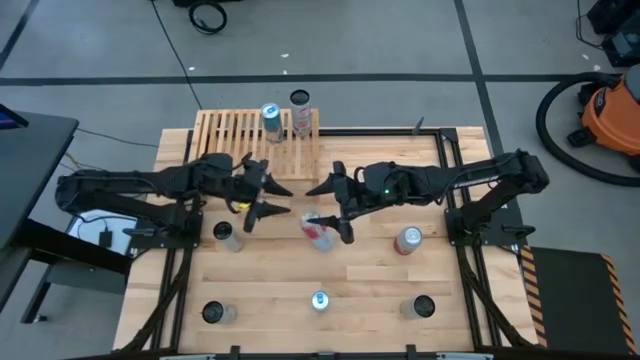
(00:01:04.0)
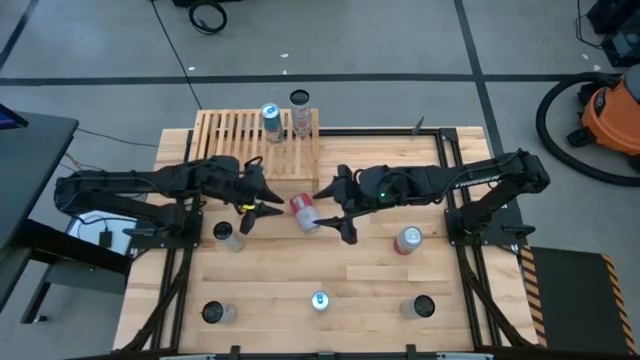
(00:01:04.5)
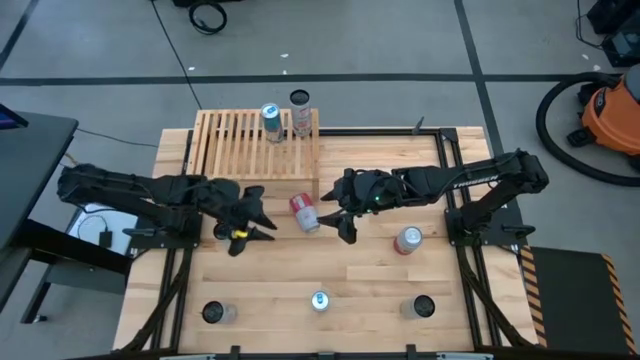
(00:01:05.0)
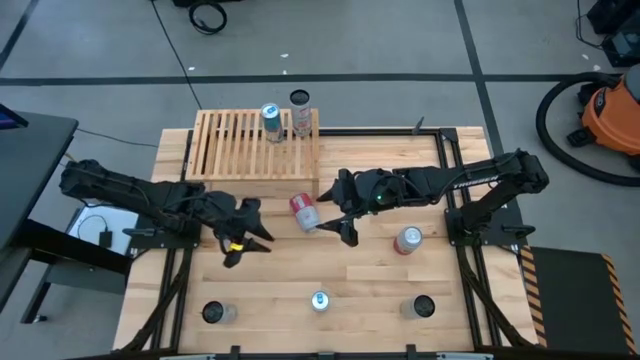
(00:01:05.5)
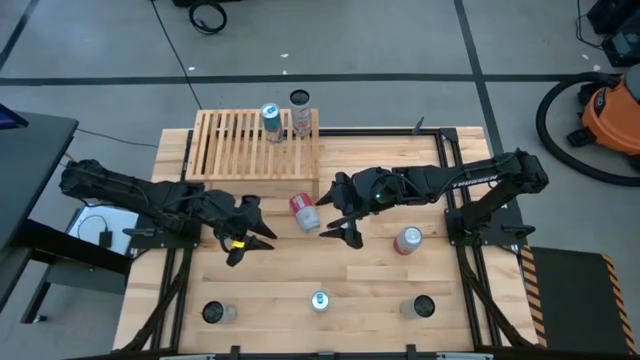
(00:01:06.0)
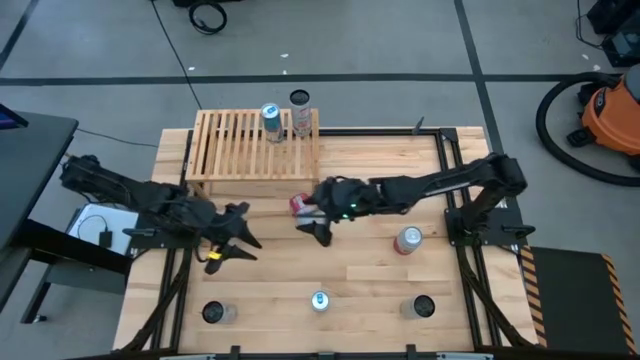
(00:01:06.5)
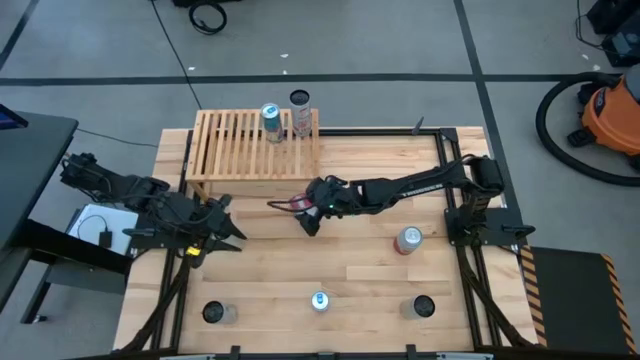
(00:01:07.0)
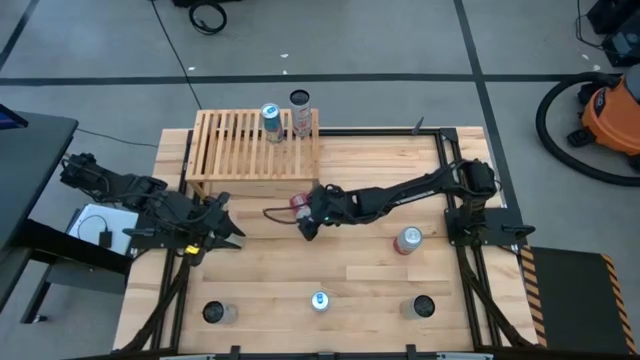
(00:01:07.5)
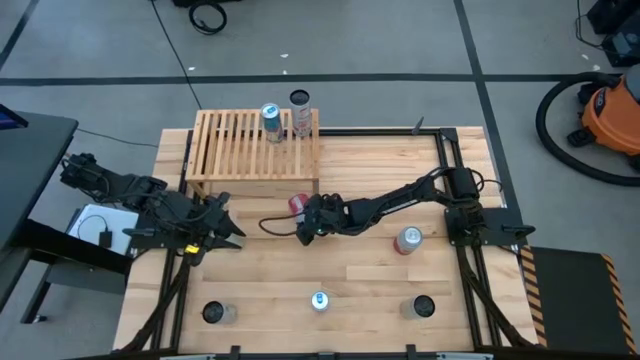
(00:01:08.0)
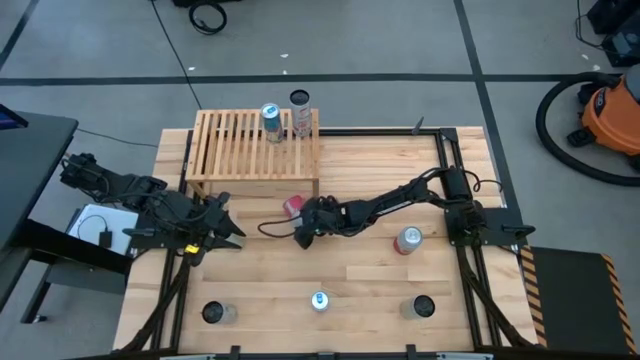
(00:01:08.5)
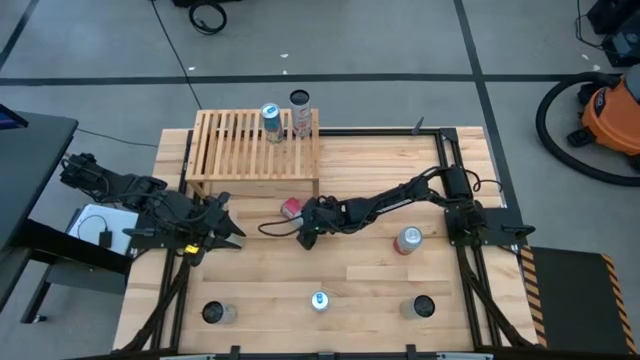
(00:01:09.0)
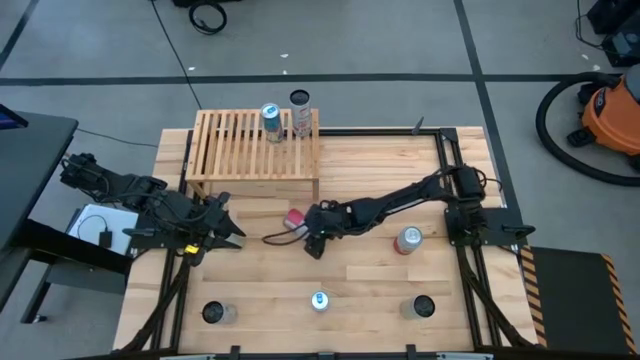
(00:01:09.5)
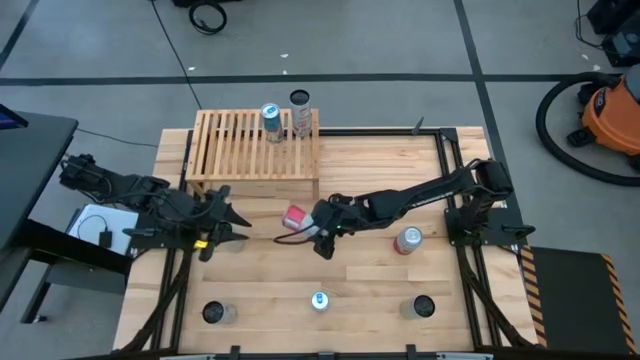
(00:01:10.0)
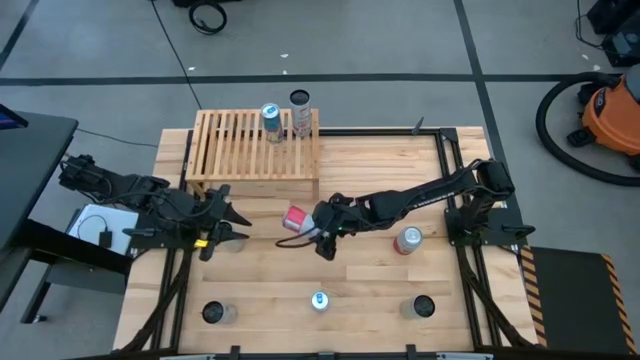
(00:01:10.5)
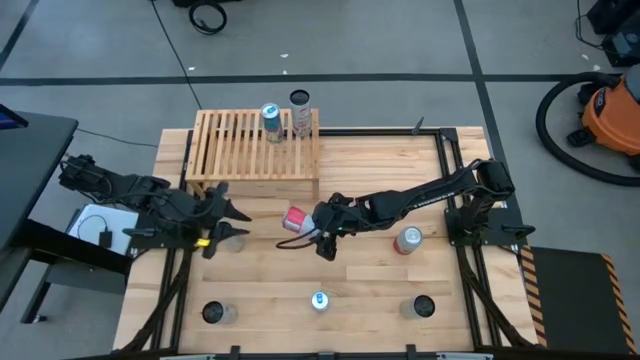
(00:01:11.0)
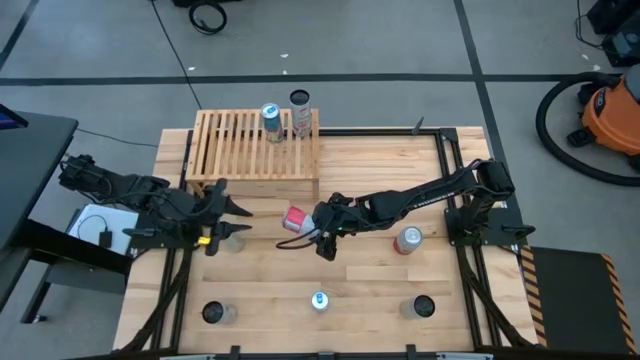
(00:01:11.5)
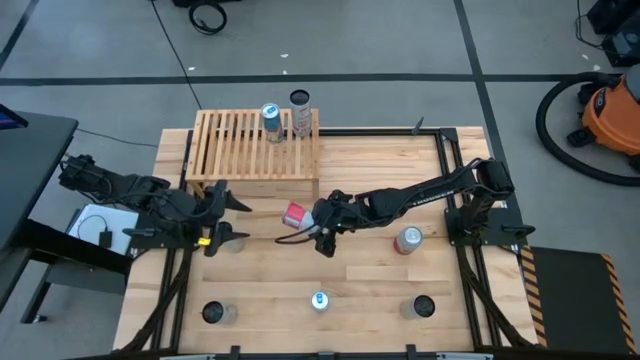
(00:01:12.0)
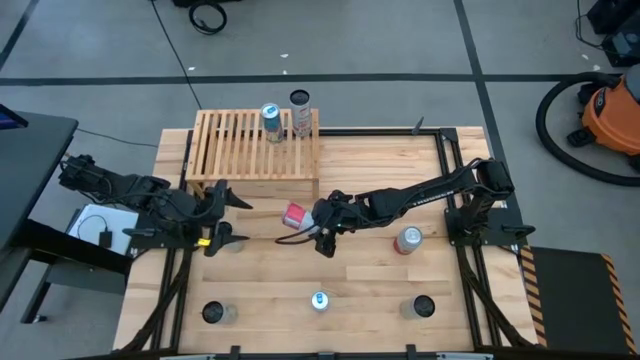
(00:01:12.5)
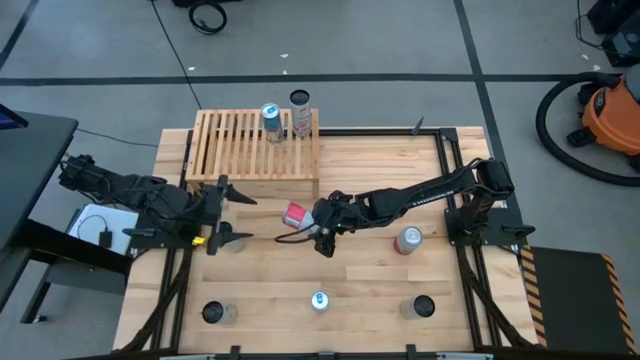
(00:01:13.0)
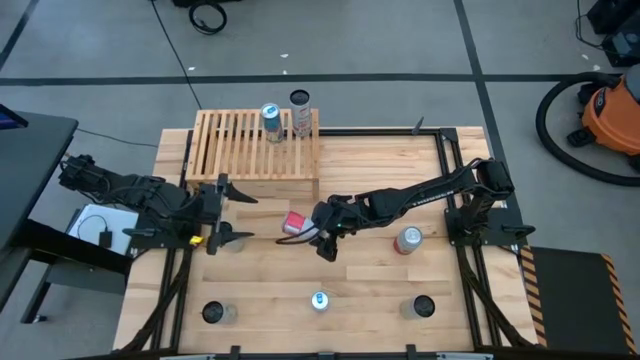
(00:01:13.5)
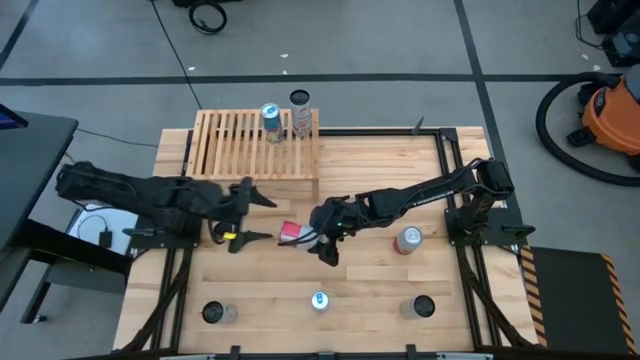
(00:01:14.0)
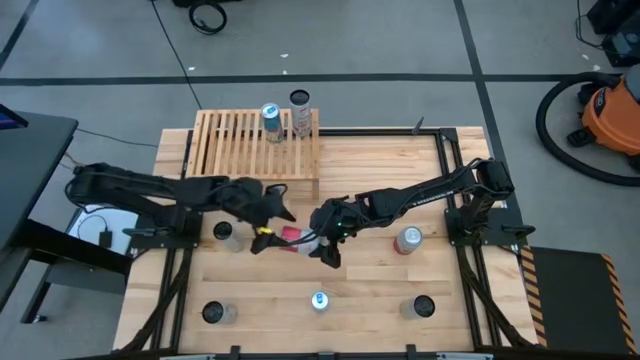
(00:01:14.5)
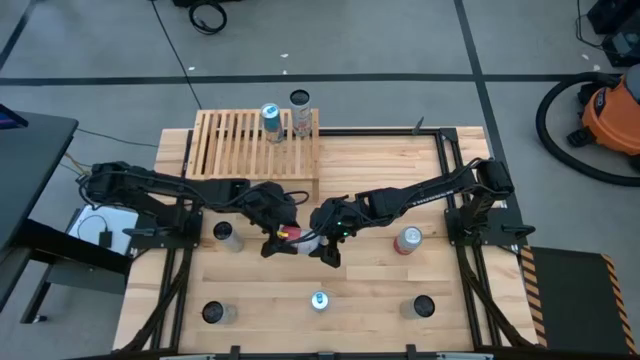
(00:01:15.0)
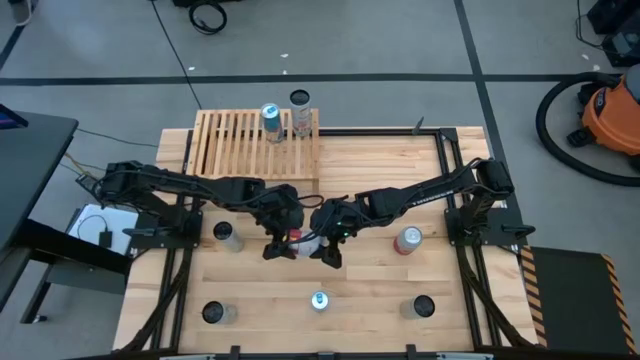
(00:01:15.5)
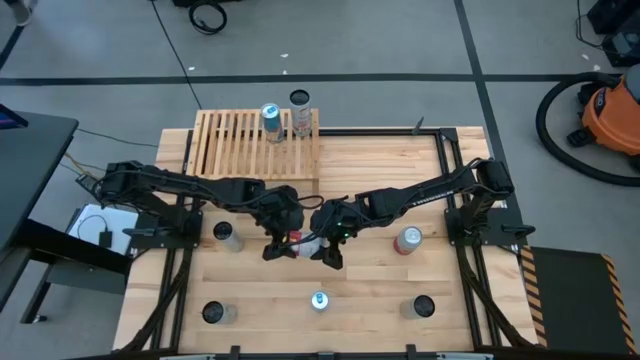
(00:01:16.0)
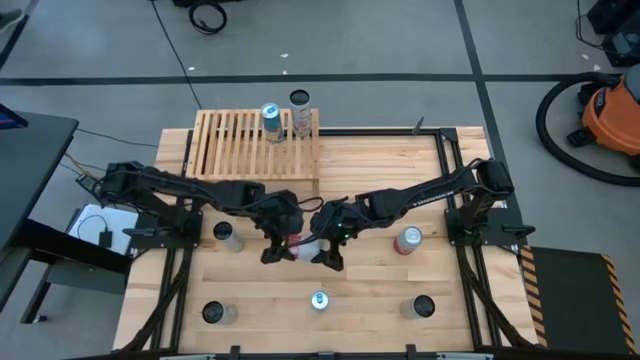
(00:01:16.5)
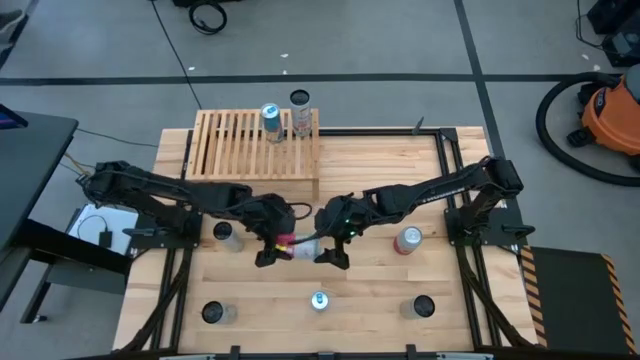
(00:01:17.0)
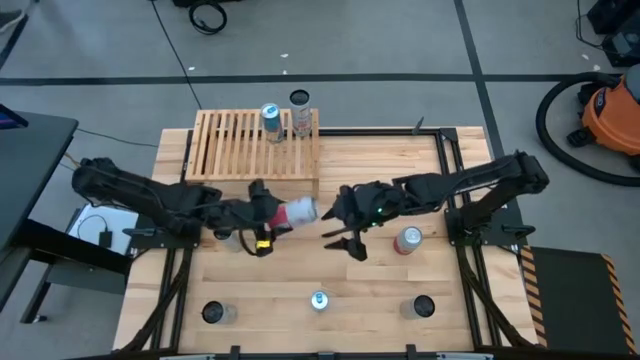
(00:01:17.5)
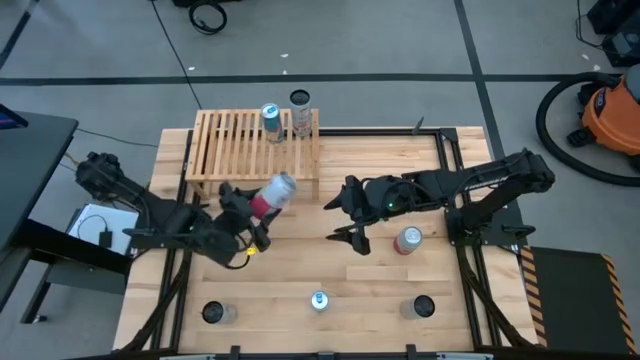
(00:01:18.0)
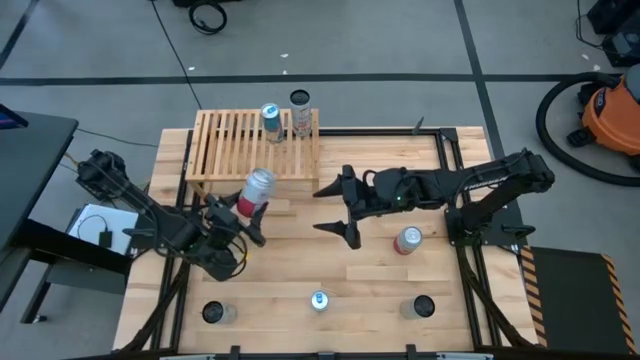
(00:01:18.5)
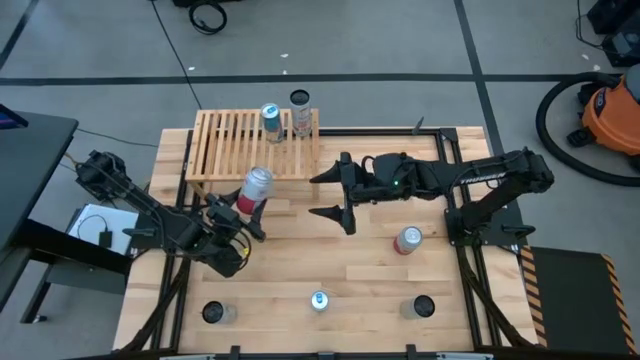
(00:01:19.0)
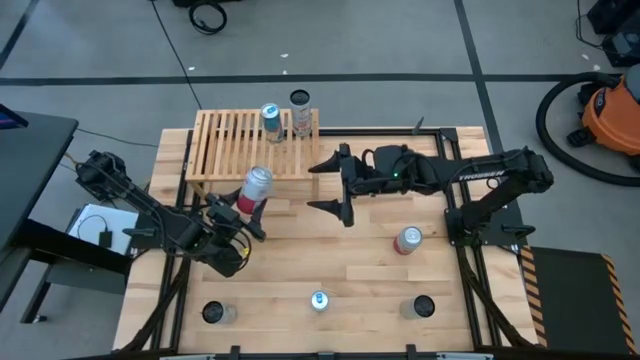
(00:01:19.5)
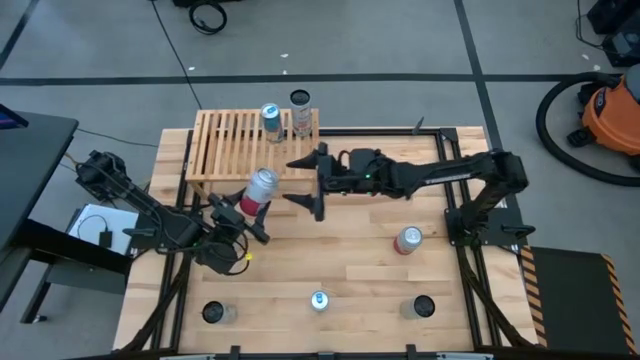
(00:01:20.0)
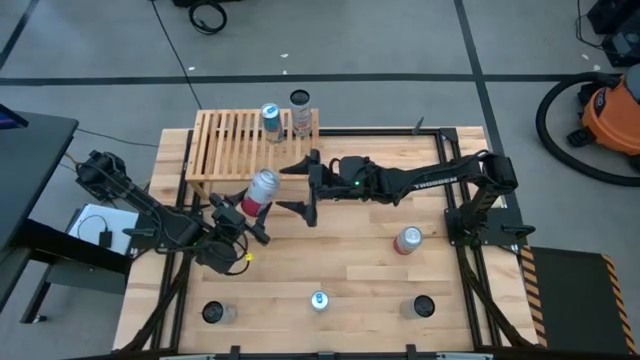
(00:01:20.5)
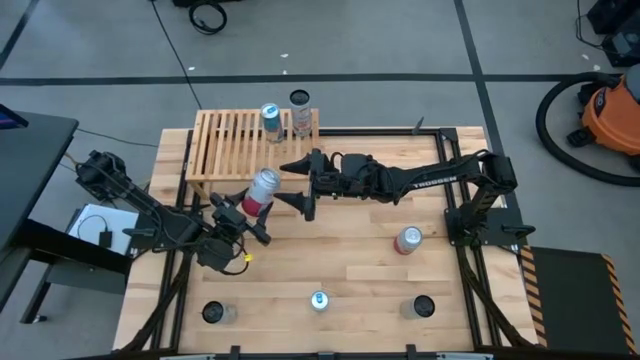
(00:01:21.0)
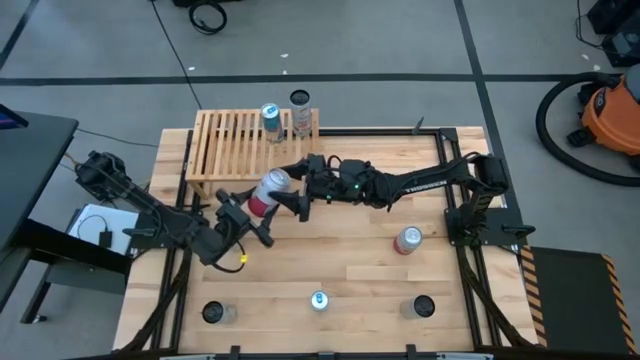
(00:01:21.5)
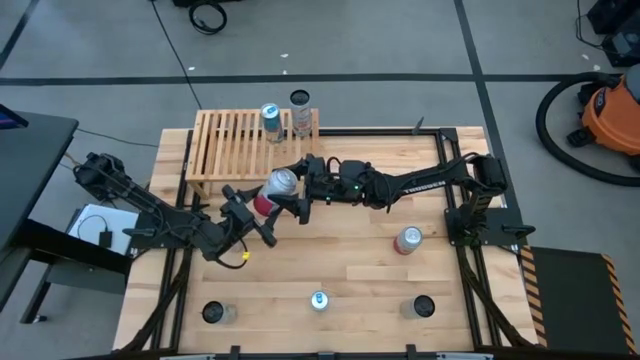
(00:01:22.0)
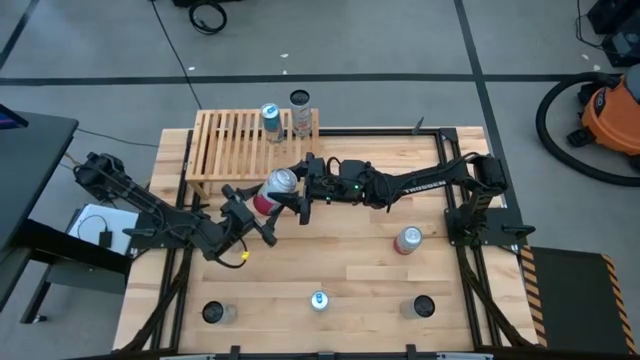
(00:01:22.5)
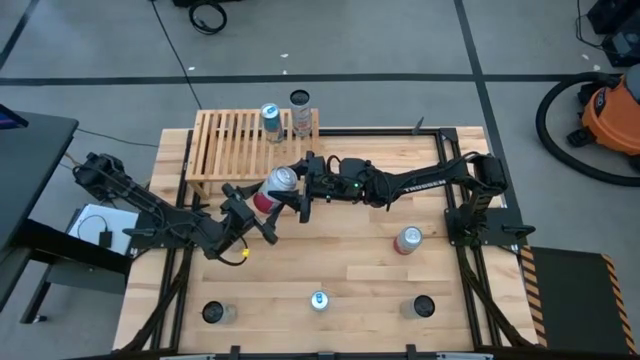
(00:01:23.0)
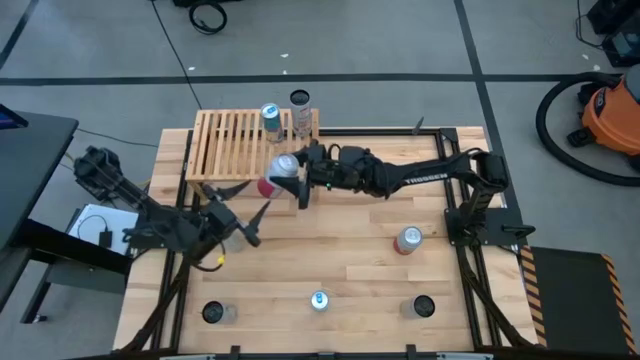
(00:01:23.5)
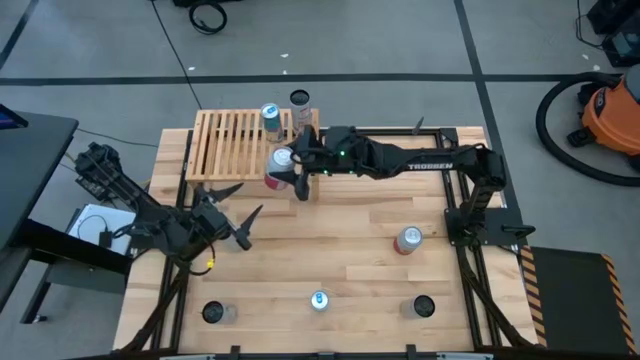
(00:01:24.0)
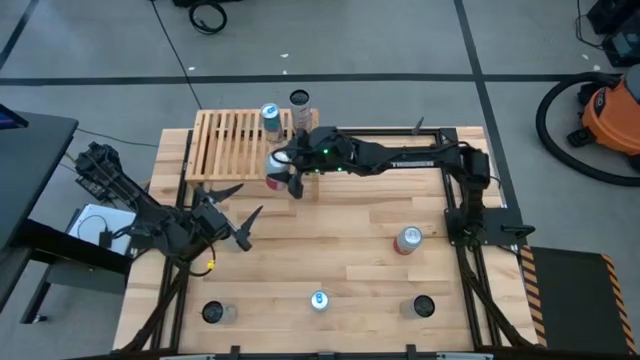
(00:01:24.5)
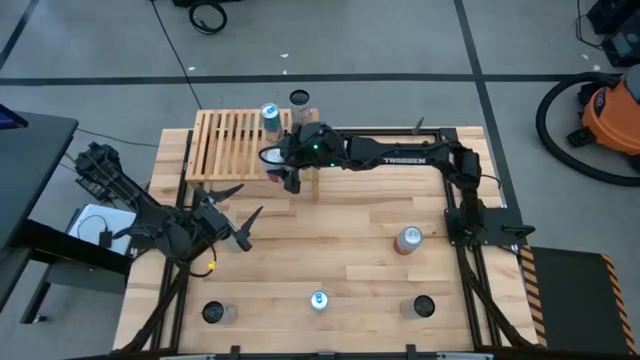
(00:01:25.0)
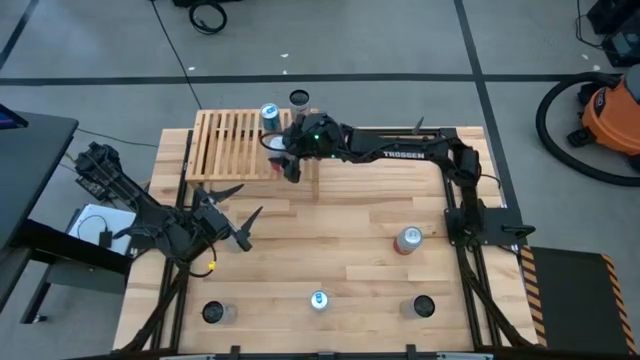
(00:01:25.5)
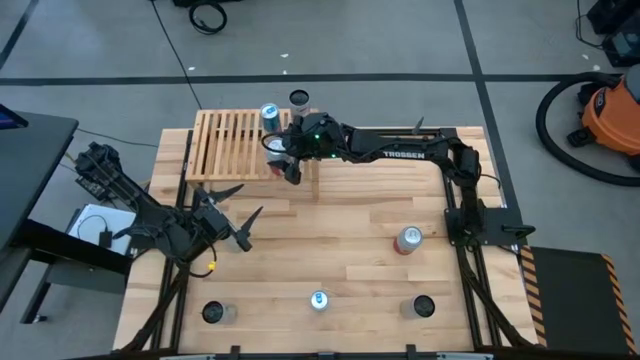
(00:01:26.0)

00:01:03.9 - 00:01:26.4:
Task: Place canned beverage on shelf
Put the top pink white soda can on the shelf
